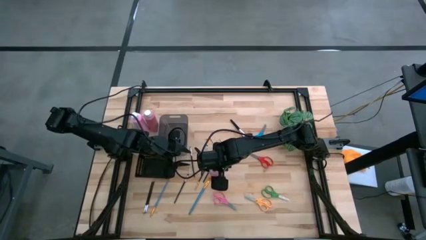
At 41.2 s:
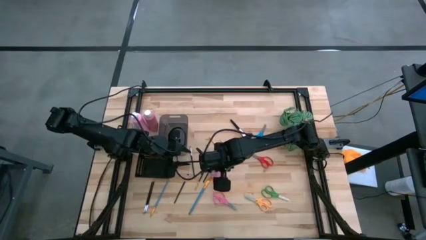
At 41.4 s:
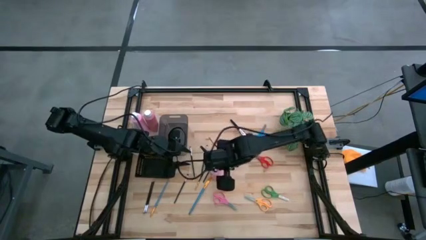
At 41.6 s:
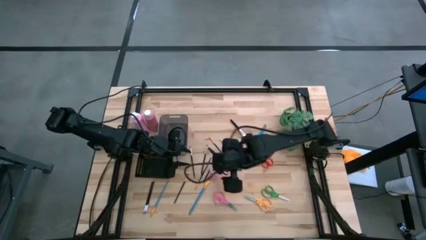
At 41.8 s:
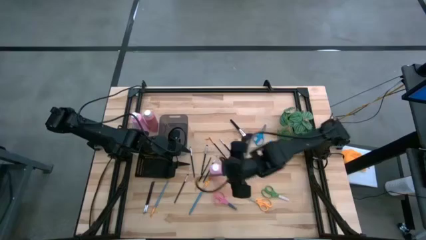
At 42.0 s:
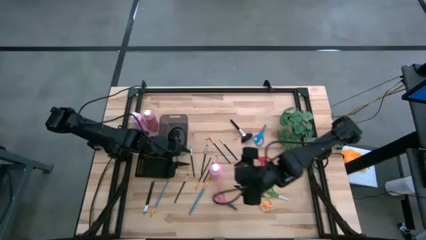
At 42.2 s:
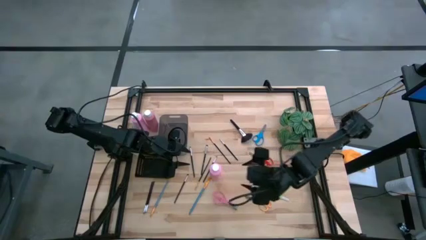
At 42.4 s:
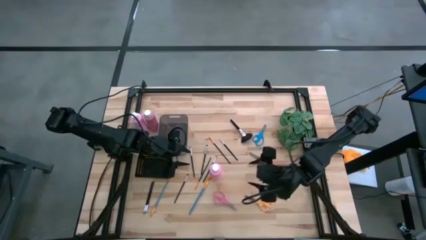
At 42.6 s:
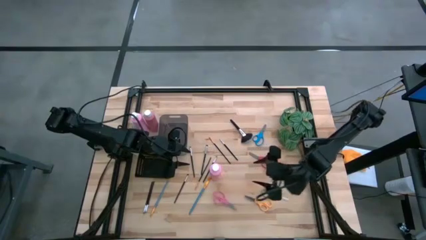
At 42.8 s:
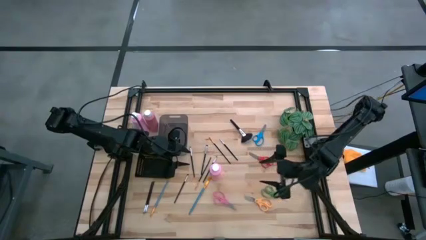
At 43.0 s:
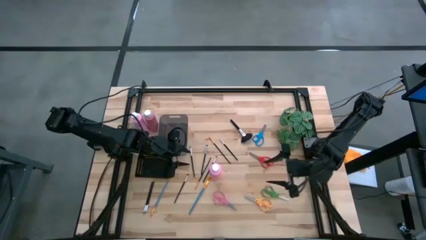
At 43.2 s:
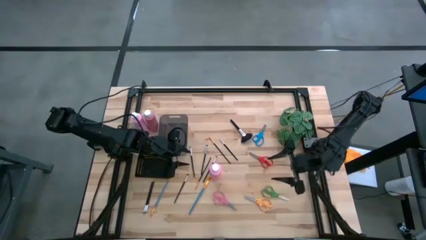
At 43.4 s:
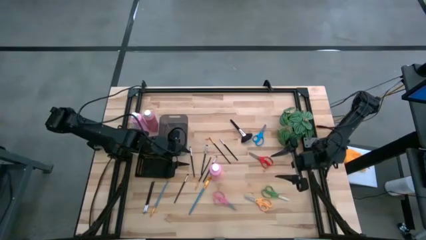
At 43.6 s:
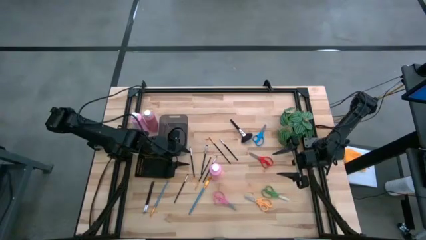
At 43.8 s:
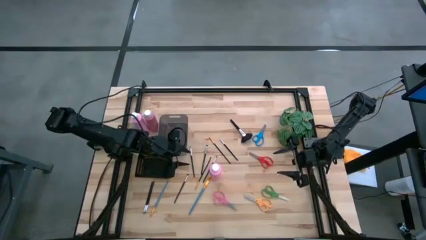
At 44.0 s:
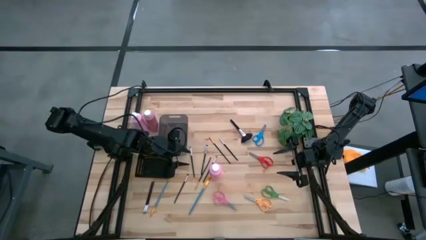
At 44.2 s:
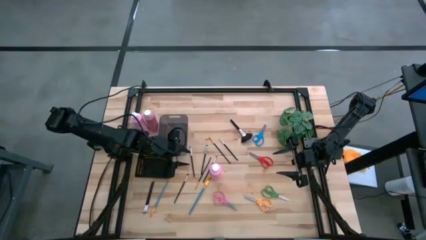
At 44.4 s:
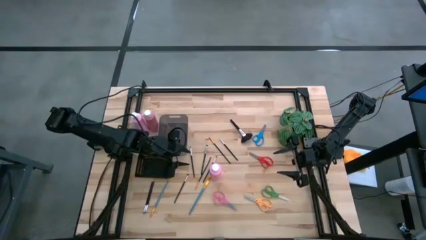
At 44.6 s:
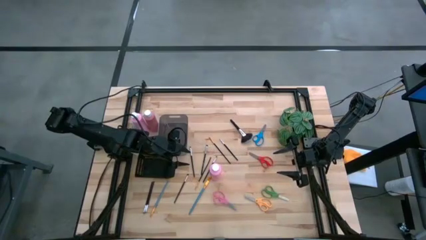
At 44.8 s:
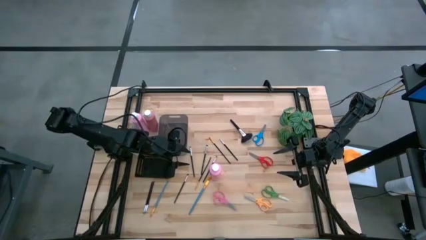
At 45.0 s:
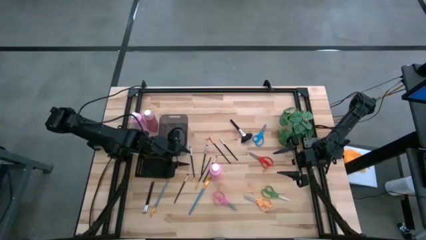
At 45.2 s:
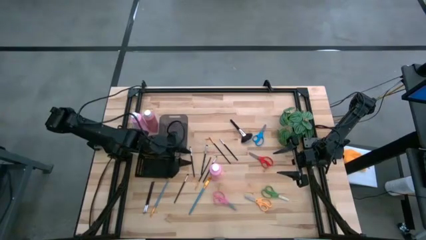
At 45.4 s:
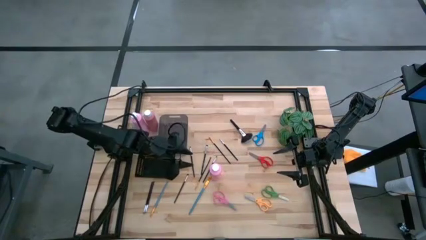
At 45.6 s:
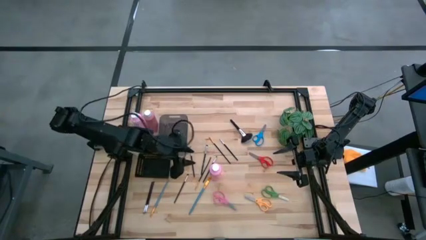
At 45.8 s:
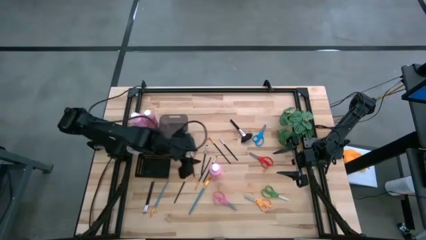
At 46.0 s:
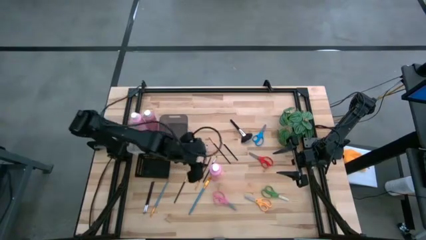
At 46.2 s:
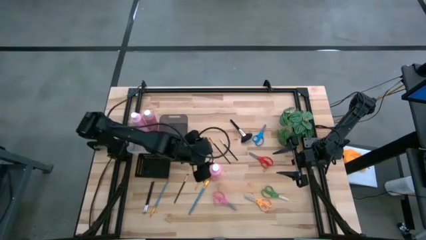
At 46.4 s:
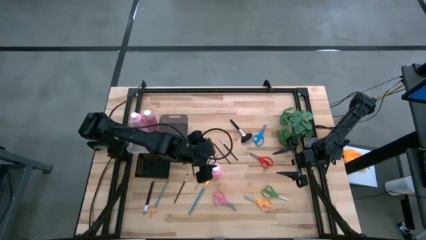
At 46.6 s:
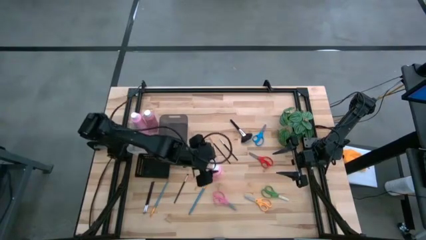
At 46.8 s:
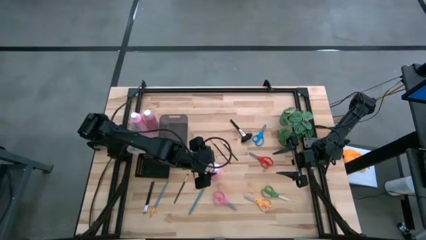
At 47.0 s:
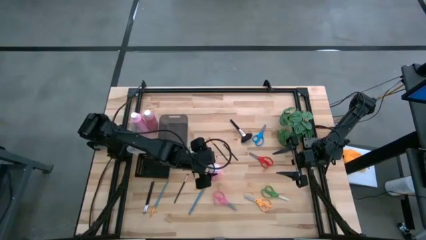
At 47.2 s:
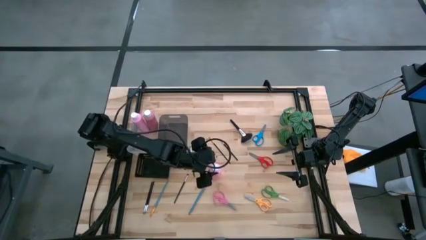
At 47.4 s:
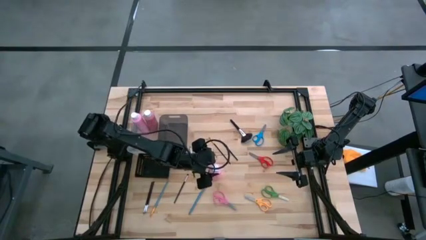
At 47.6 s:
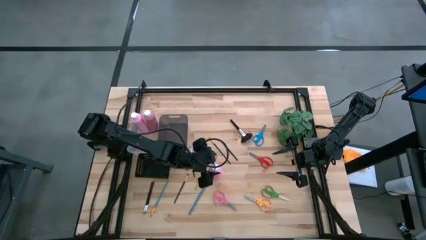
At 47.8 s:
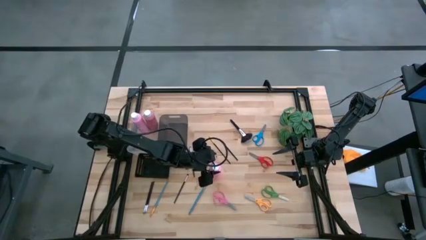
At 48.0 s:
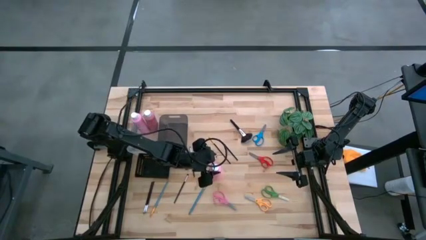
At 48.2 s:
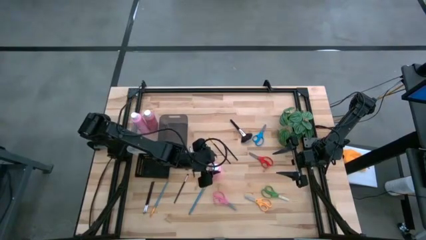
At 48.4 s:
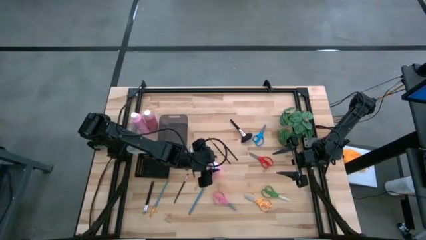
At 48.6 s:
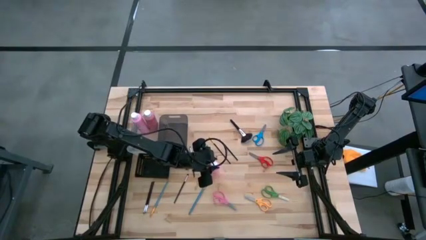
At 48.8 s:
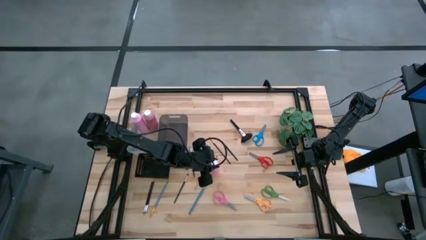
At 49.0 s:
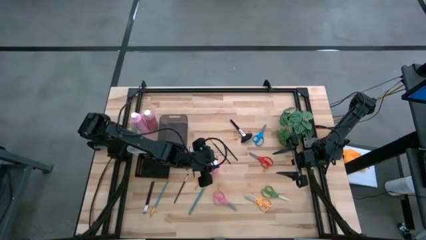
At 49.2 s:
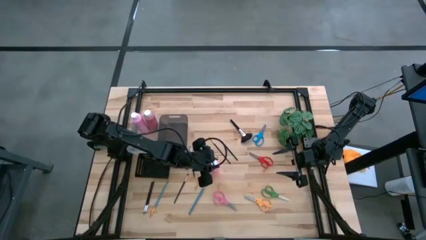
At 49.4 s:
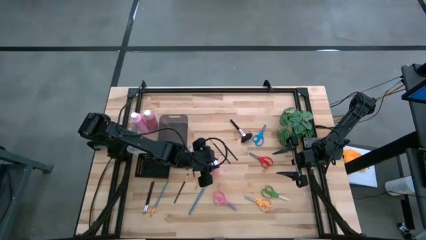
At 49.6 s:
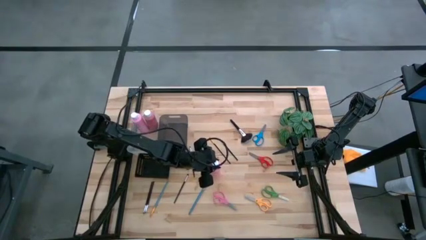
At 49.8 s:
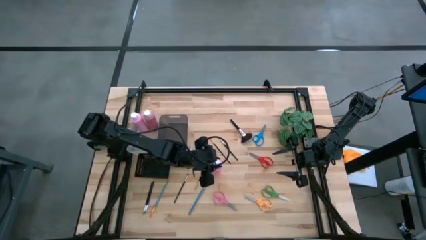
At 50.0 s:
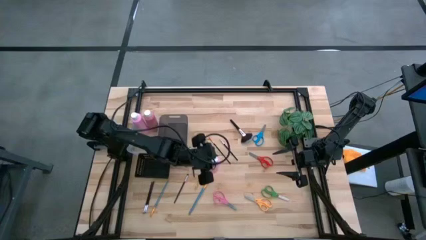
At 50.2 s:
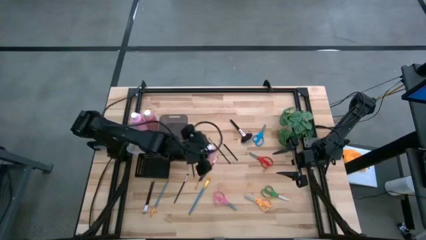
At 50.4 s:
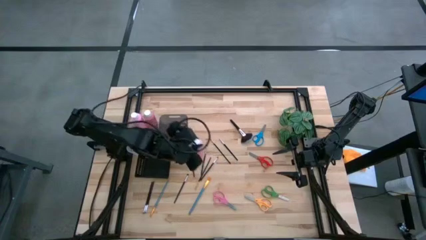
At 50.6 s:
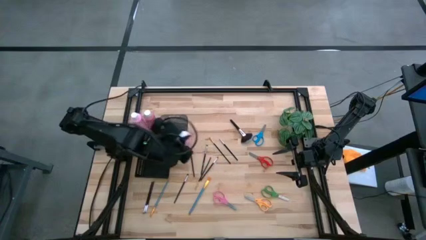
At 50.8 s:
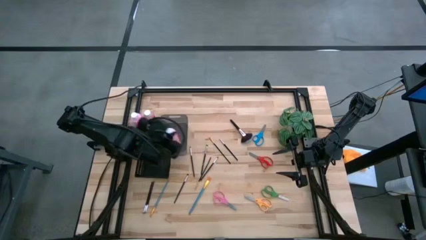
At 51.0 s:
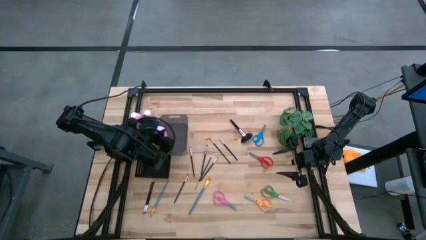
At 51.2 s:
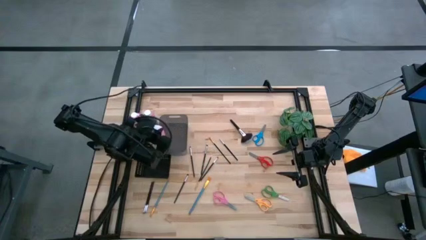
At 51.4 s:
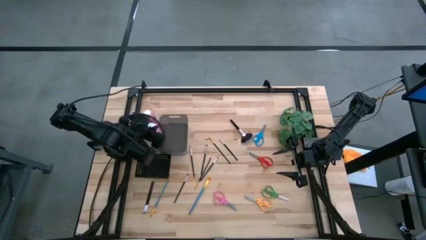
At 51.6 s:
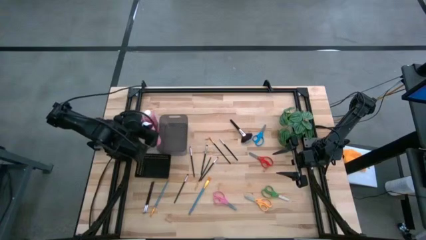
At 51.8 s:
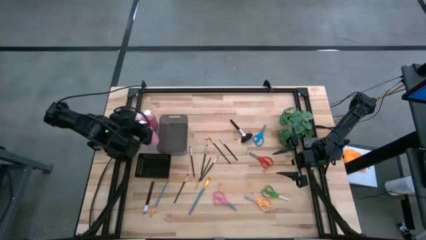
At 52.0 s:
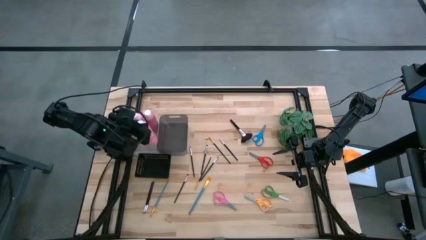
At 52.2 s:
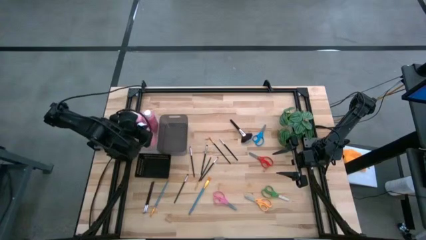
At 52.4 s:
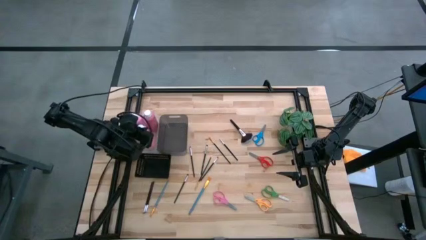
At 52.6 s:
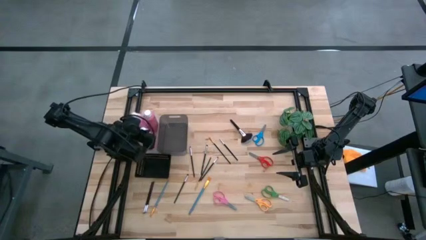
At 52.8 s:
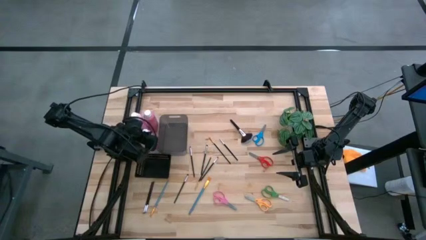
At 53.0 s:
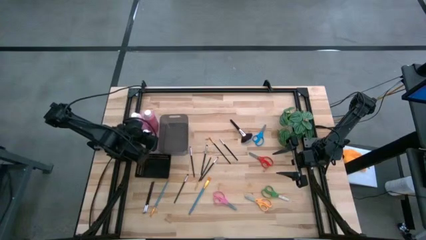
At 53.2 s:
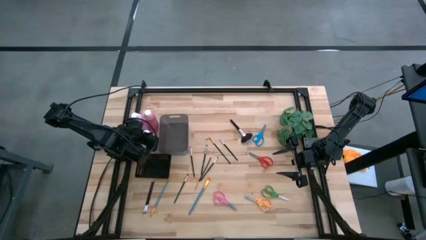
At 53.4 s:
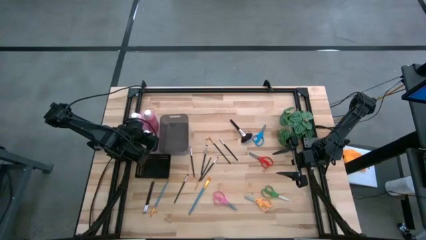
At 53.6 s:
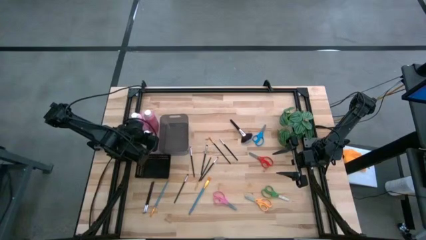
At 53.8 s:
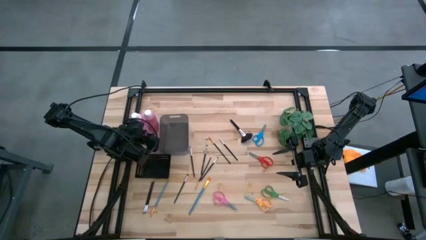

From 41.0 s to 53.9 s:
Task: Pick & Place Paint Supplies
Put the right light pink bottle into the white bin
